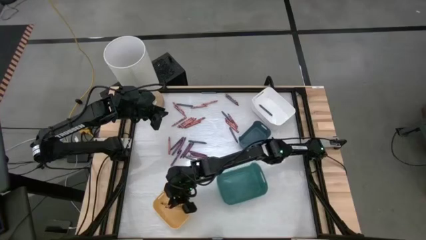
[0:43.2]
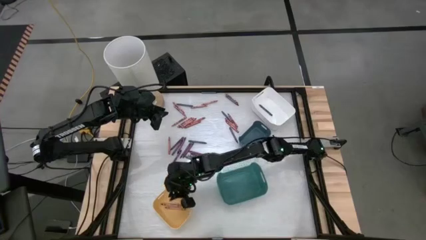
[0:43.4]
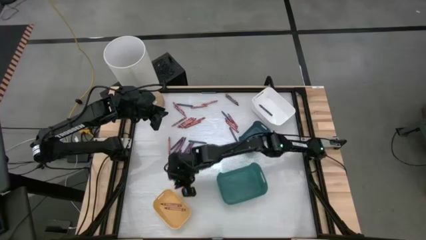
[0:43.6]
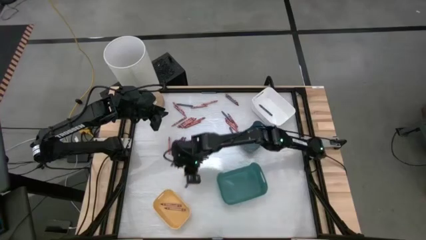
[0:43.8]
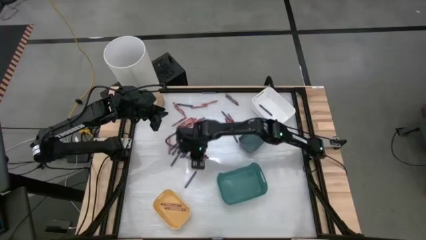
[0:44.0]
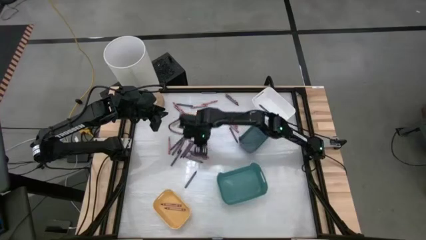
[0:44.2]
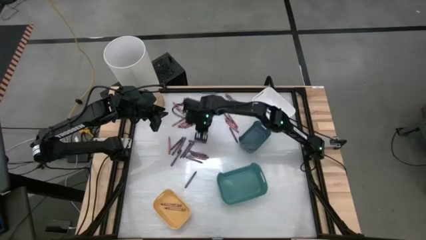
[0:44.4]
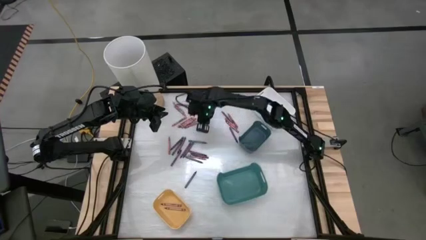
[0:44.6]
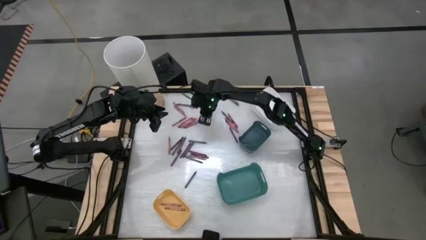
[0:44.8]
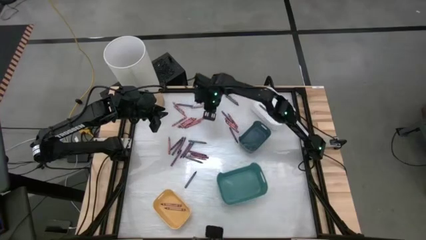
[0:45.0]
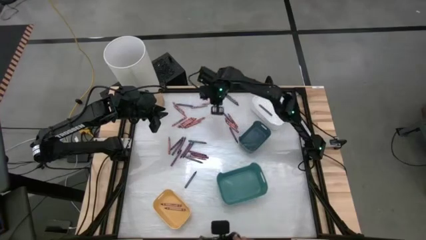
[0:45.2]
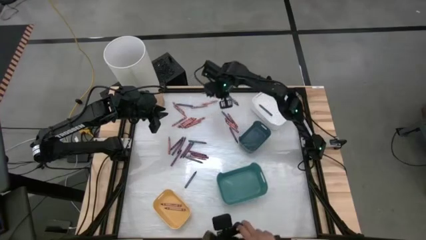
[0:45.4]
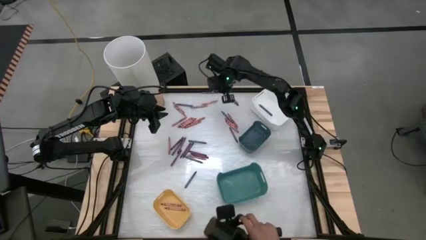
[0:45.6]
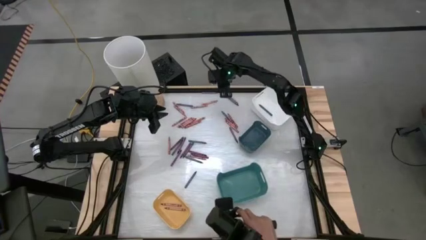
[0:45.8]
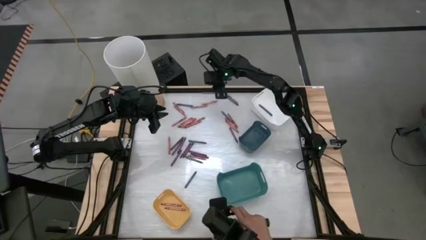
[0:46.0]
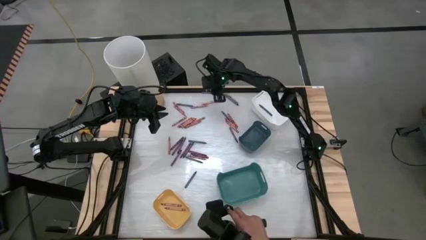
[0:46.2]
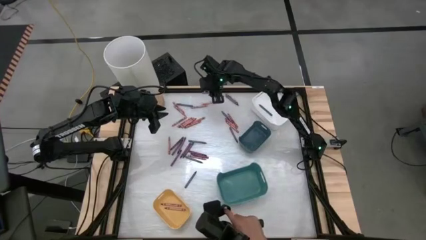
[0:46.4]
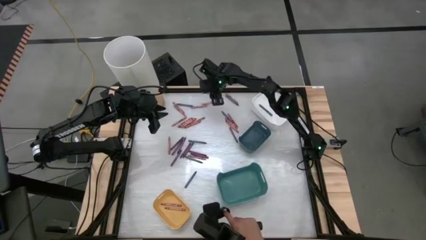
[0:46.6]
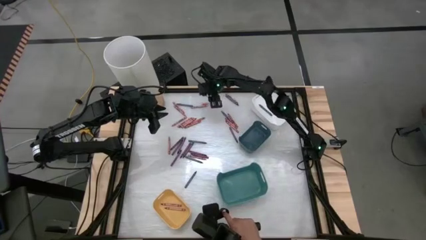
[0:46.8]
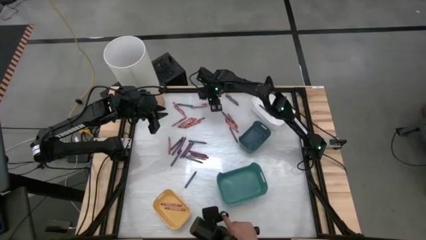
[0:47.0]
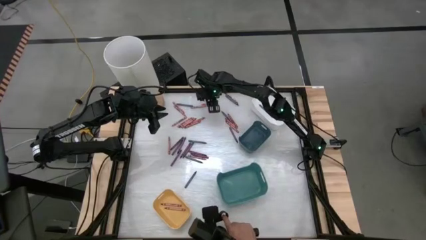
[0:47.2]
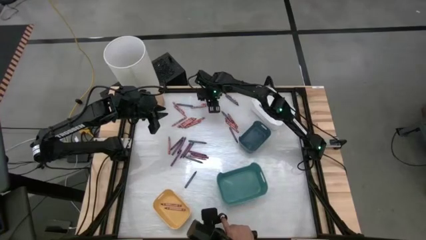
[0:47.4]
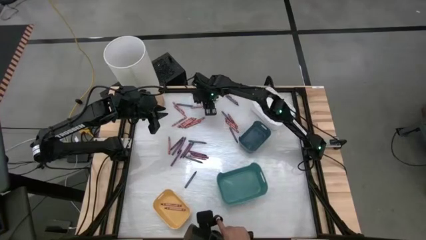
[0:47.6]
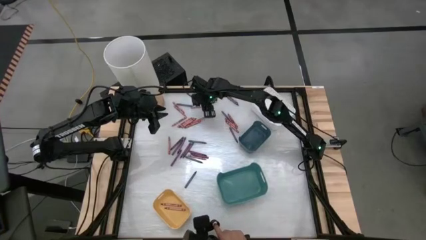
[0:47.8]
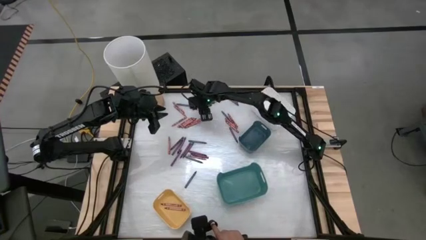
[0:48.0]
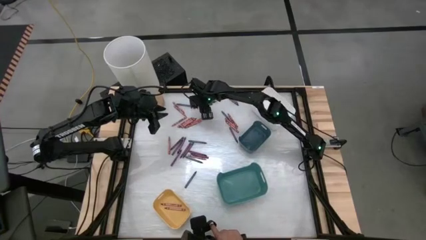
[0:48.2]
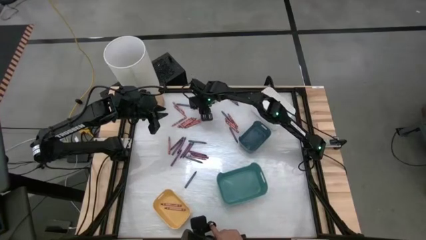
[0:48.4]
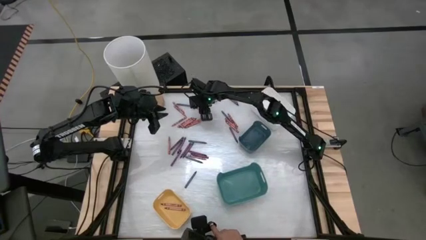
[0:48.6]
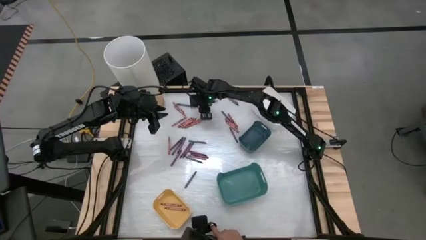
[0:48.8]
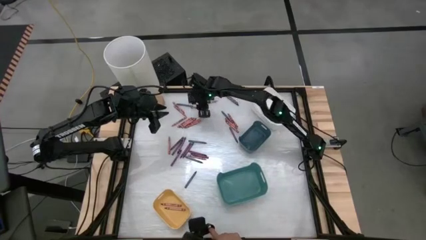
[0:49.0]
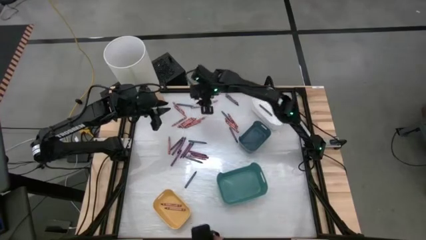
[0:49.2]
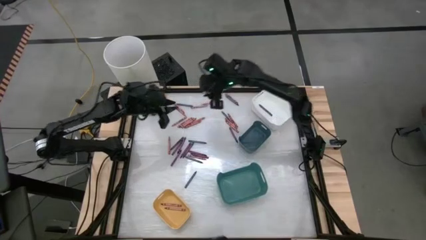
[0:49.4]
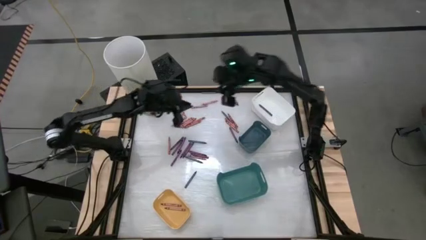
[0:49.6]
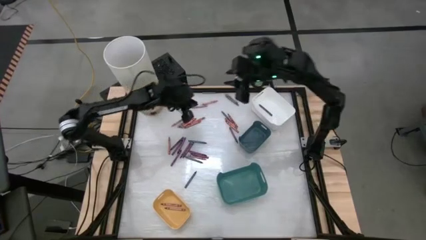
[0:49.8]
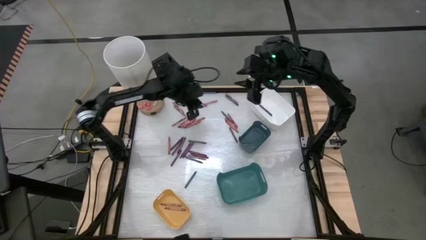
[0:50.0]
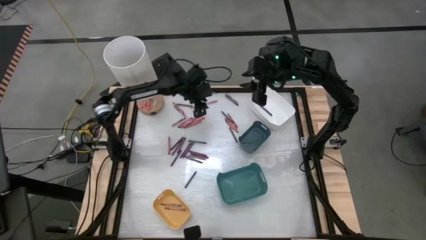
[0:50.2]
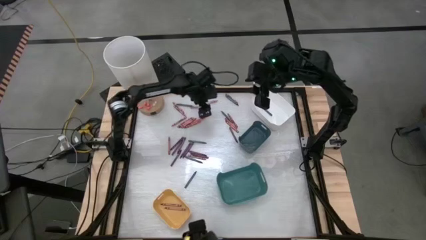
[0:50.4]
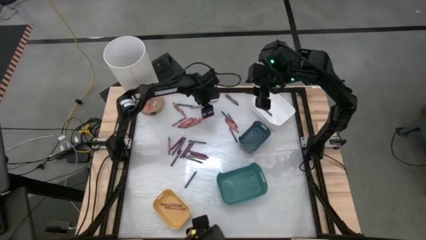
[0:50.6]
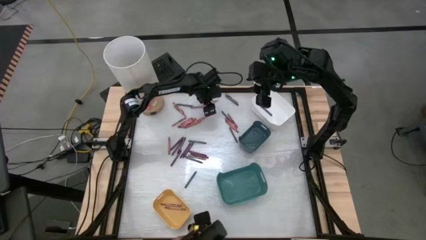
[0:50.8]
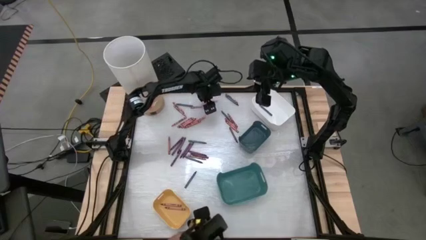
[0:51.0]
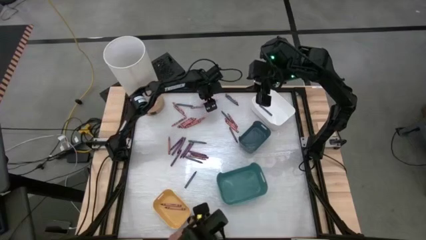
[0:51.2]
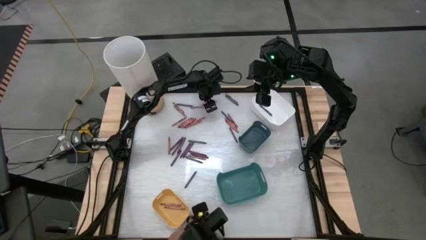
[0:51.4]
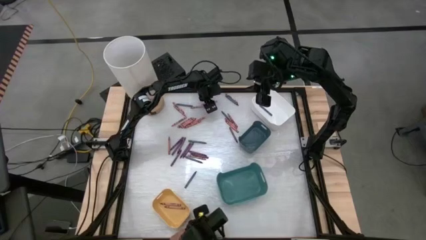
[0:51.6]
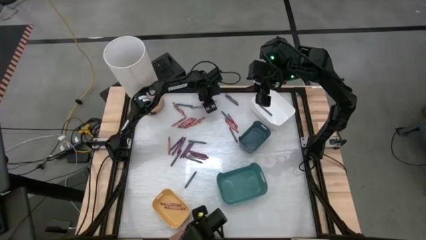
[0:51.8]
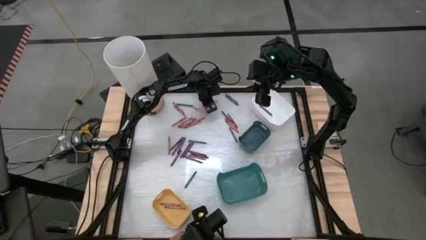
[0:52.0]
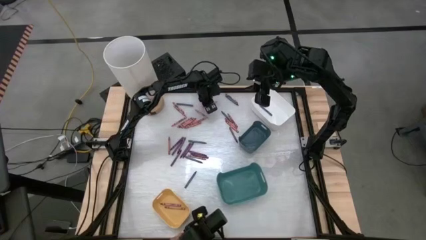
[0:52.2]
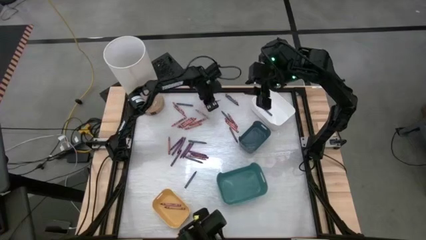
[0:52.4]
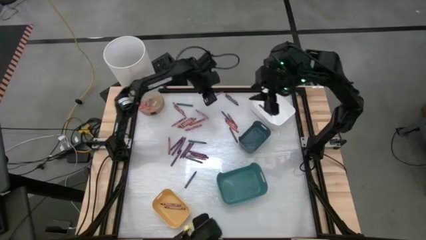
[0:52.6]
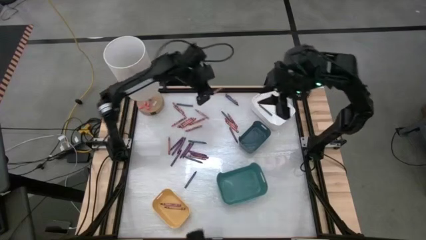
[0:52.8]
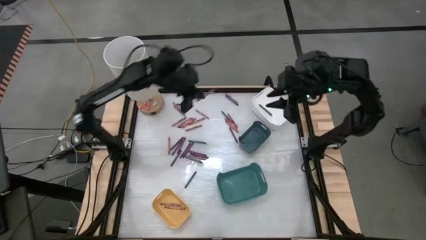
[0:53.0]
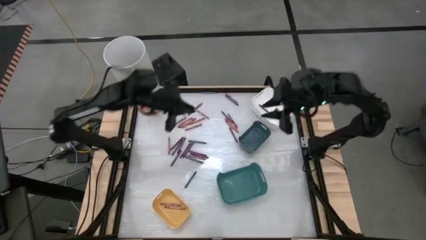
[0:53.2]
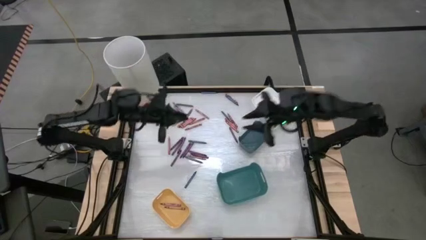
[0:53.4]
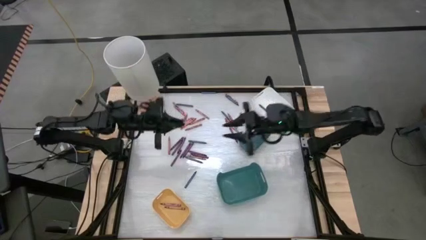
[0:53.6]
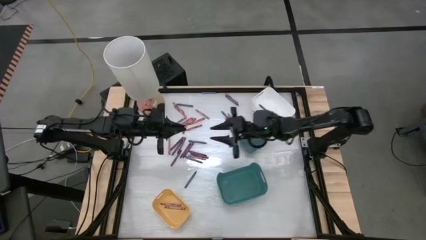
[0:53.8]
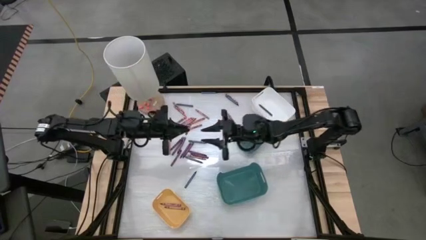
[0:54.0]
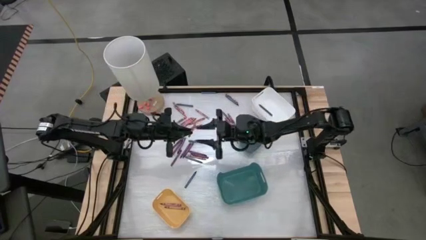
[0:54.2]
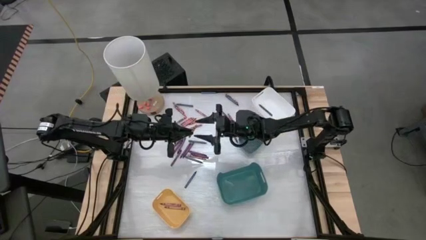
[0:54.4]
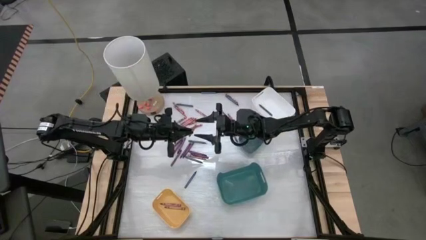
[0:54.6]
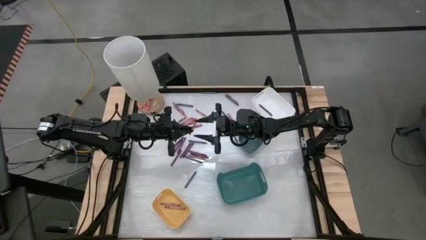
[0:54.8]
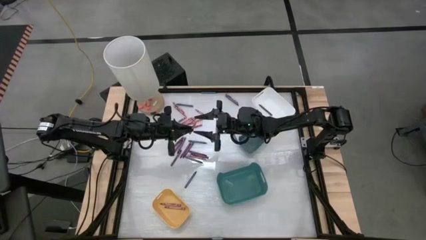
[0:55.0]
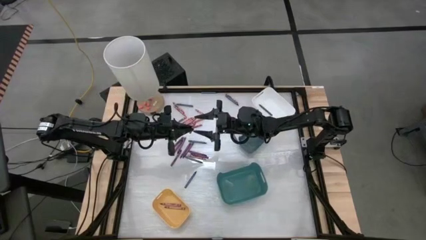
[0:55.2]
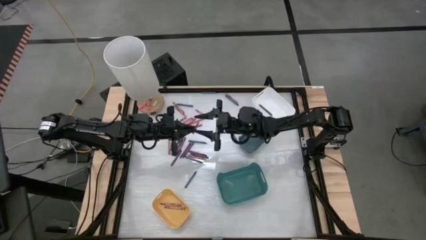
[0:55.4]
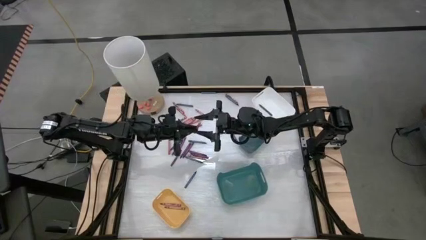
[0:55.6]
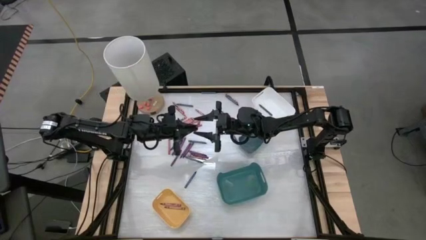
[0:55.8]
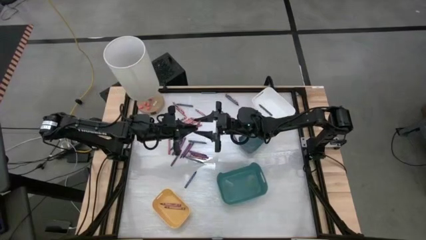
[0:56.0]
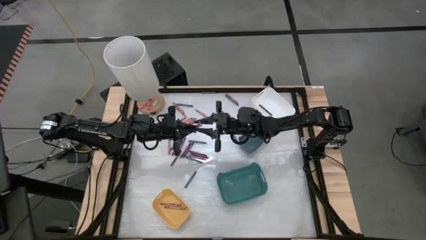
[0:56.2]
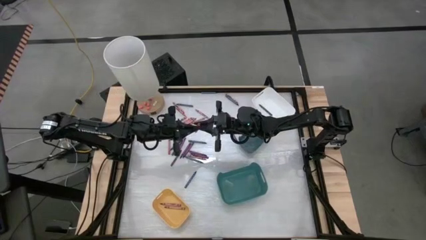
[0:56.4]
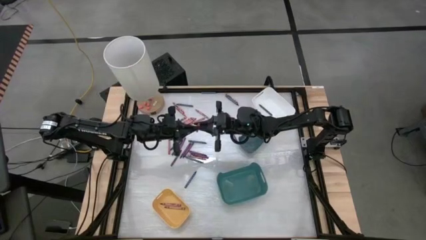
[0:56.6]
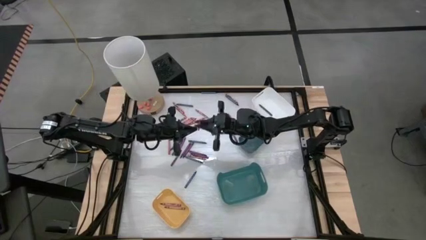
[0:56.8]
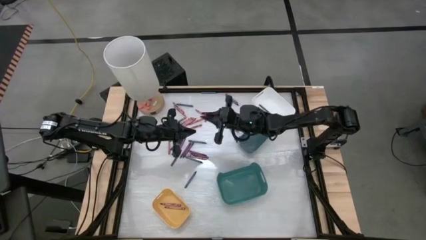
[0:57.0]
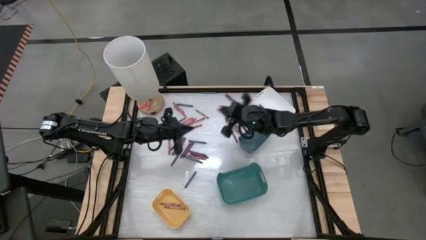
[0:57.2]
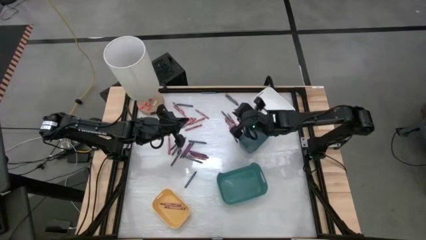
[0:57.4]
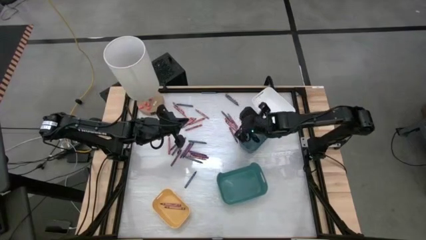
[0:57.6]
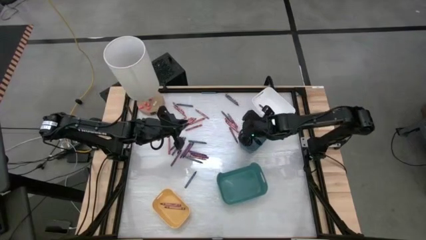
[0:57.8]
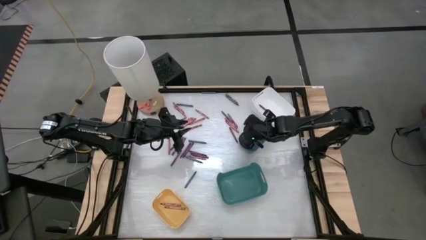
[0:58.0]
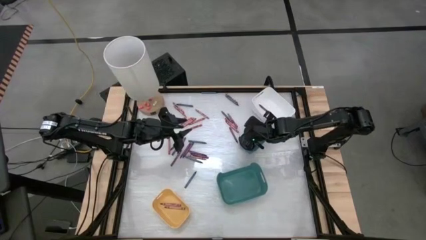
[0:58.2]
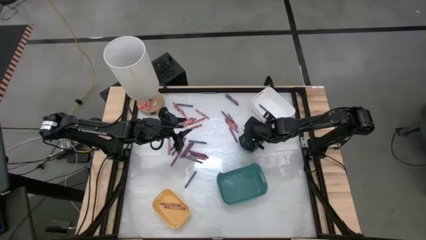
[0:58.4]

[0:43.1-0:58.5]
Task: Sort crayons
Put the pink crayon into the dark blue bin

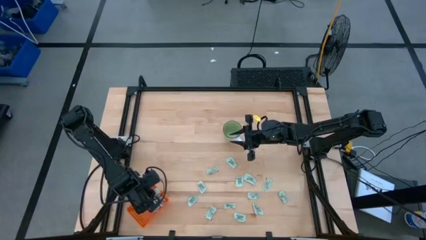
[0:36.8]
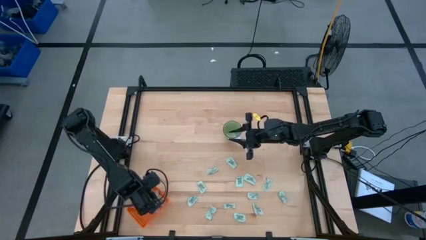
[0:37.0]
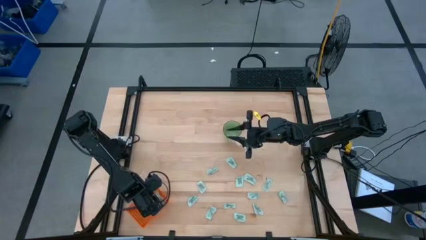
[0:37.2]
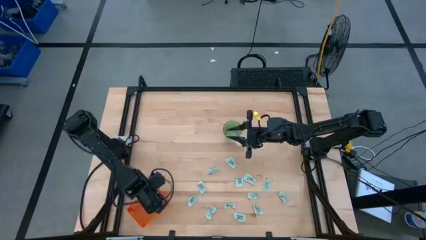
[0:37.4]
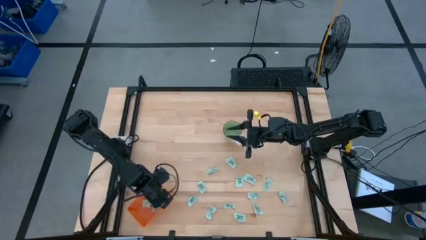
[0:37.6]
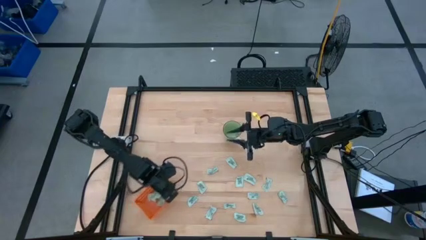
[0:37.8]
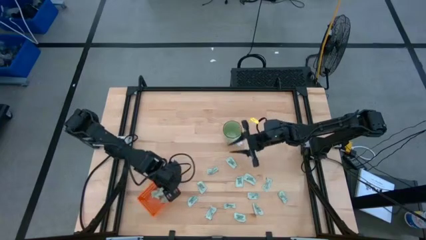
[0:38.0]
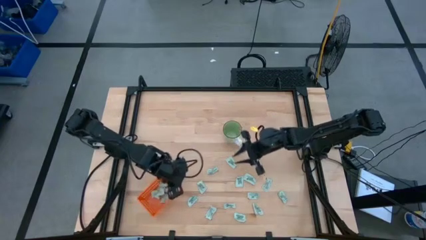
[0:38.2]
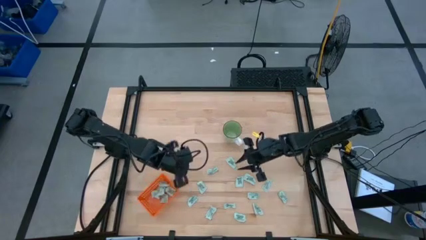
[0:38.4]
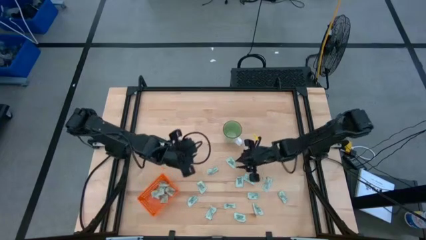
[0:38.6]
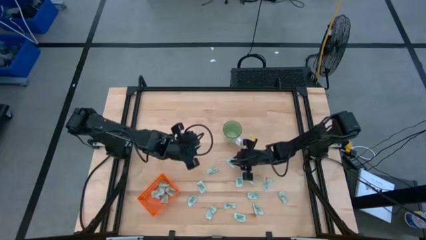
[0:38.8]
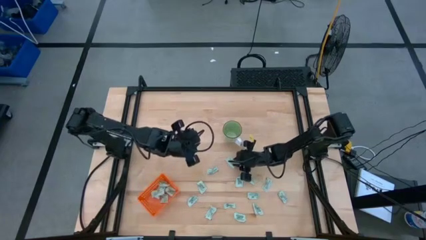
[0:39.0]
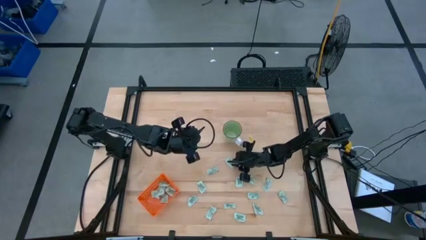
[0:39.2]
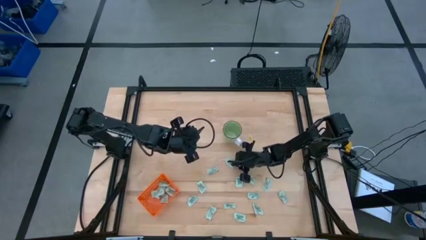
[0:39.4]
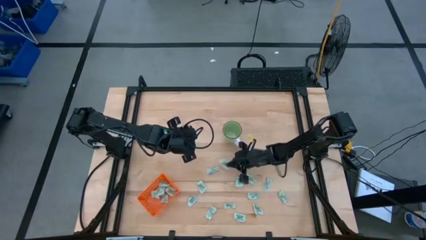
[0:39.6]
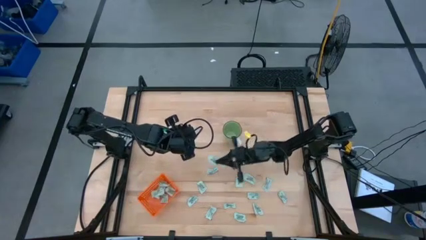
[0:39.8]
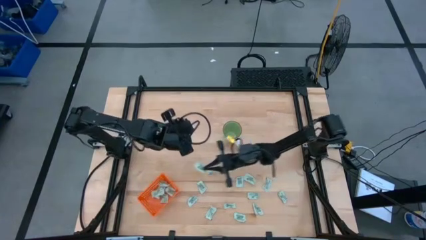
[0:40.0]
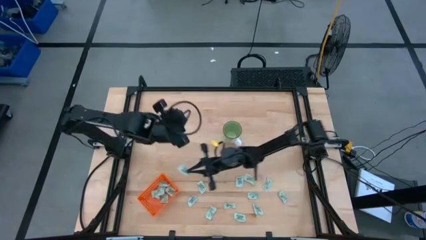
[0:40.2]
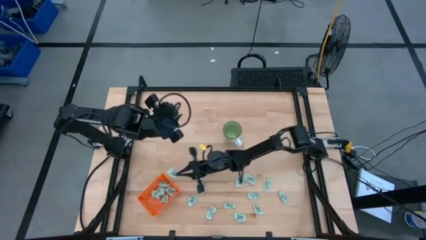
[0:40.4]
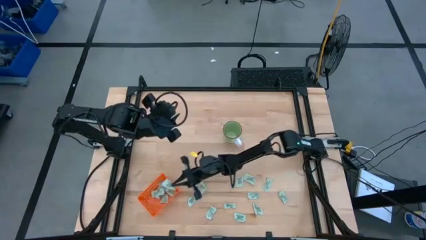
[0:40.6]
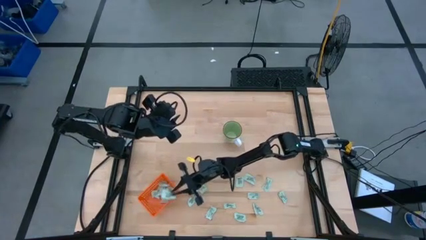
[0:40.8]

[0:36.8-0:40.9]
Task: Pick and place Stevia / Truvia into bins
Put the light green stevia packet into the orange basket
